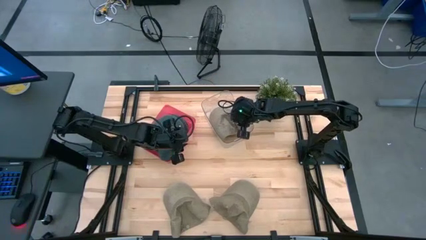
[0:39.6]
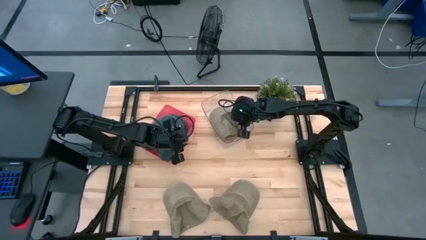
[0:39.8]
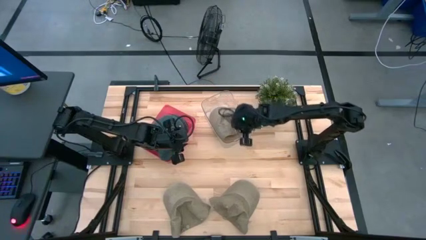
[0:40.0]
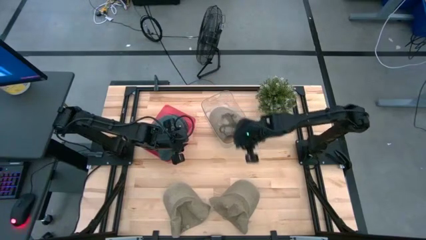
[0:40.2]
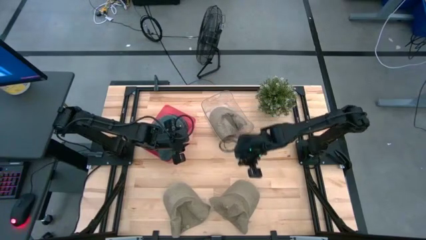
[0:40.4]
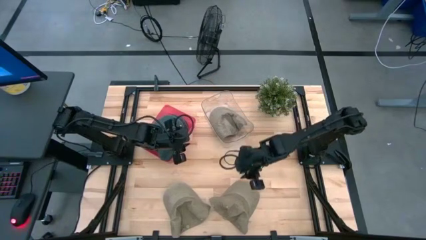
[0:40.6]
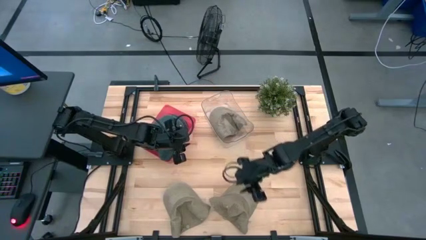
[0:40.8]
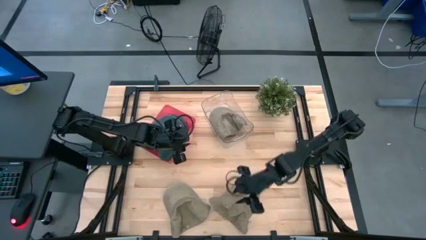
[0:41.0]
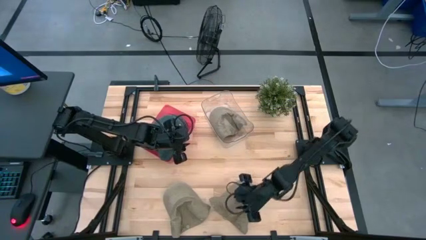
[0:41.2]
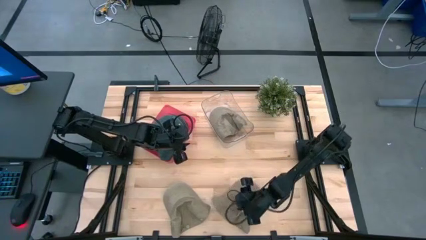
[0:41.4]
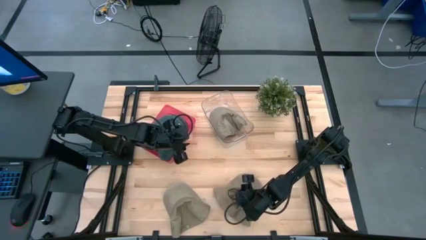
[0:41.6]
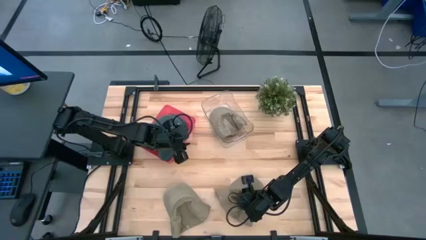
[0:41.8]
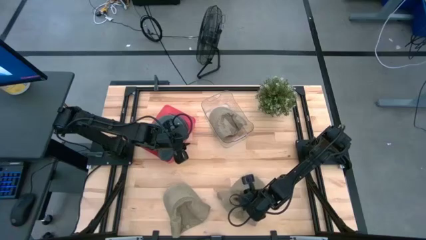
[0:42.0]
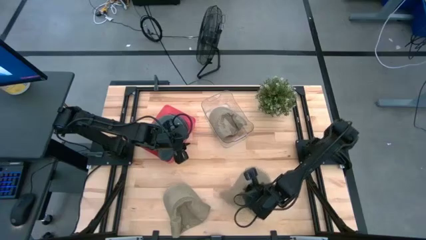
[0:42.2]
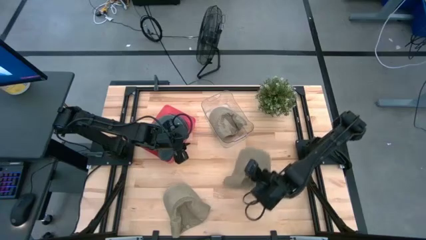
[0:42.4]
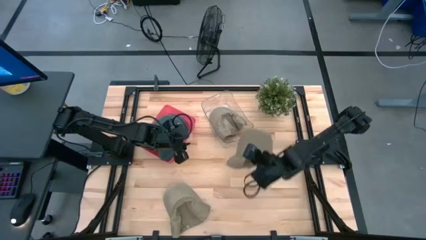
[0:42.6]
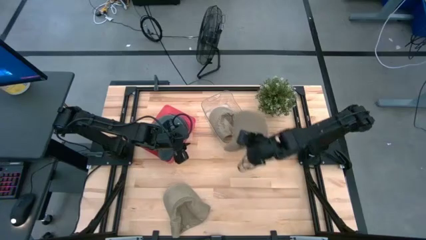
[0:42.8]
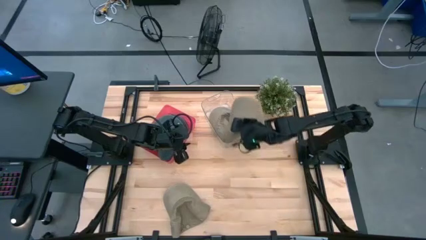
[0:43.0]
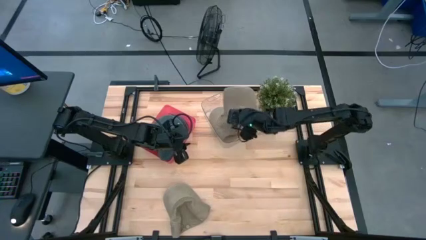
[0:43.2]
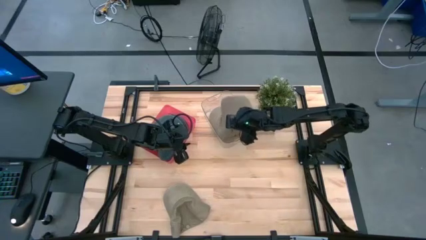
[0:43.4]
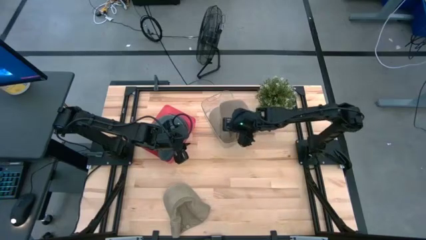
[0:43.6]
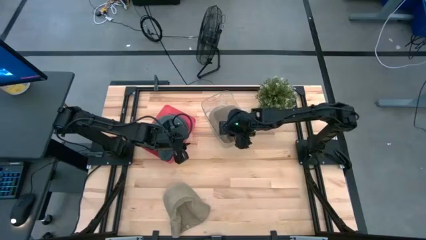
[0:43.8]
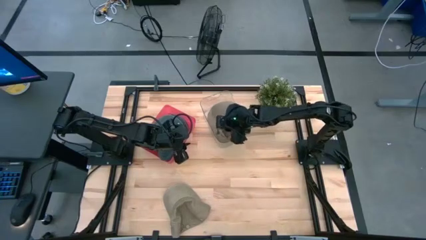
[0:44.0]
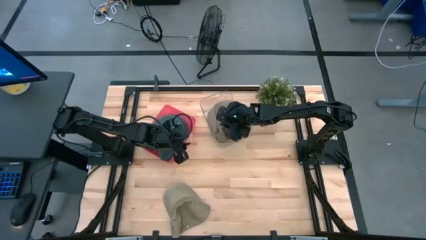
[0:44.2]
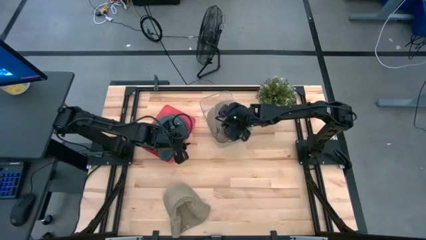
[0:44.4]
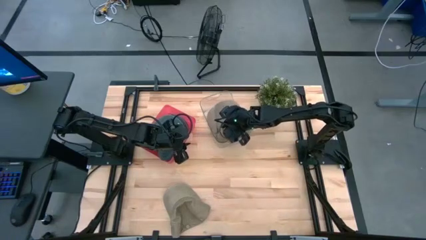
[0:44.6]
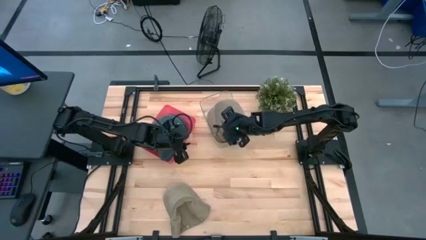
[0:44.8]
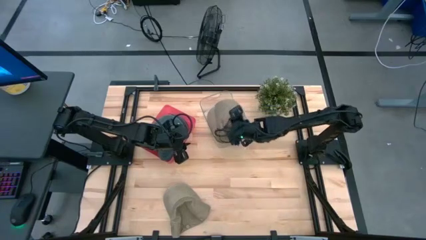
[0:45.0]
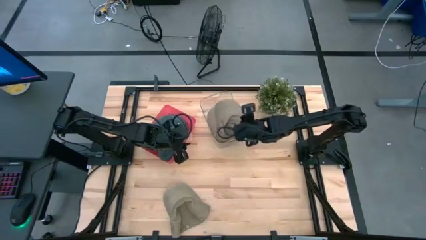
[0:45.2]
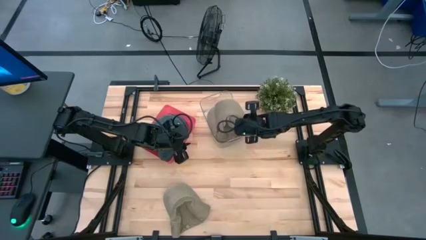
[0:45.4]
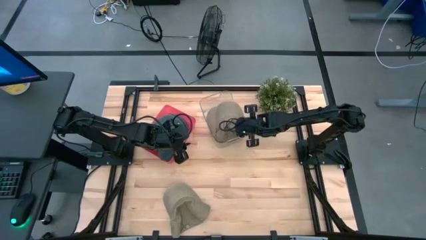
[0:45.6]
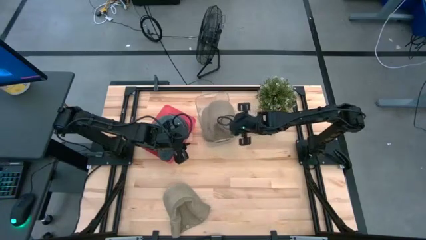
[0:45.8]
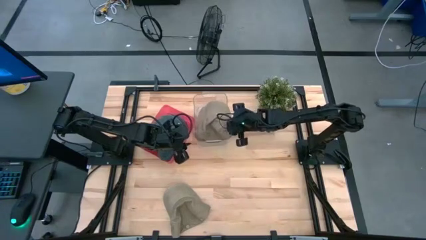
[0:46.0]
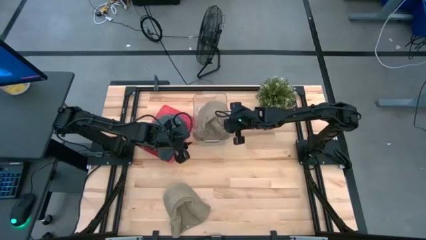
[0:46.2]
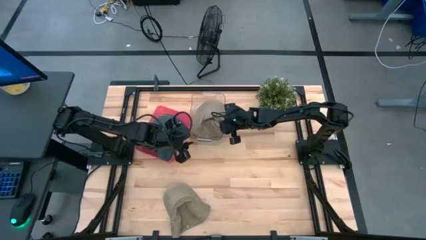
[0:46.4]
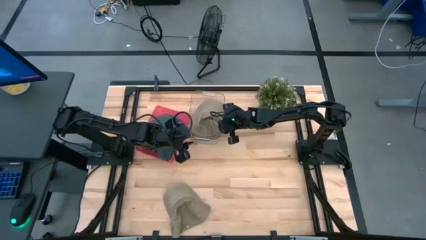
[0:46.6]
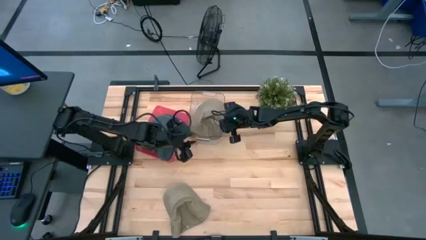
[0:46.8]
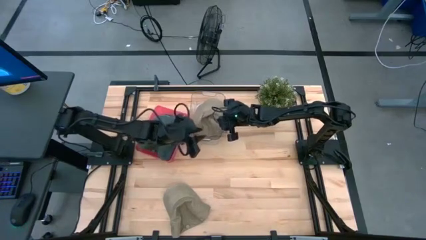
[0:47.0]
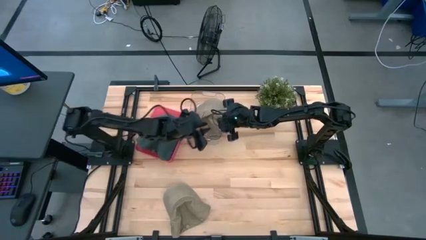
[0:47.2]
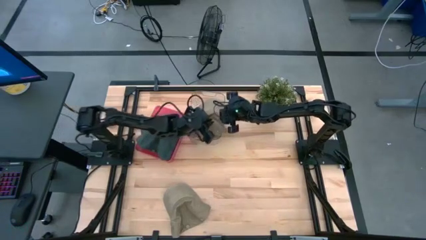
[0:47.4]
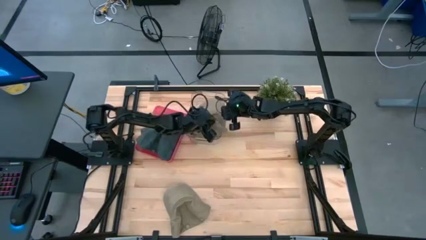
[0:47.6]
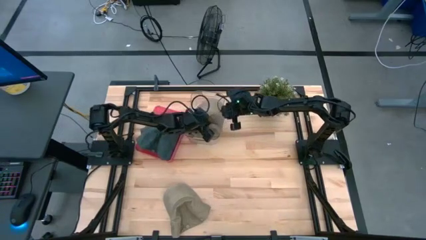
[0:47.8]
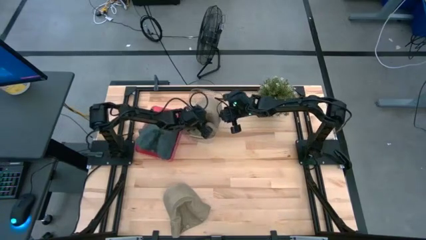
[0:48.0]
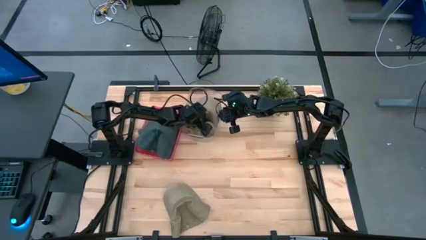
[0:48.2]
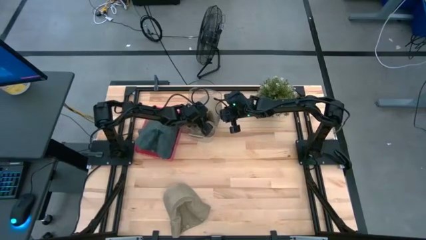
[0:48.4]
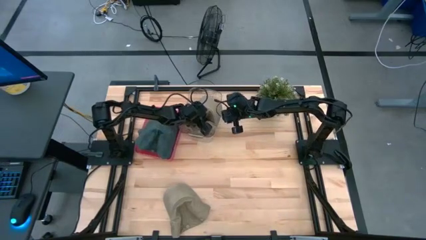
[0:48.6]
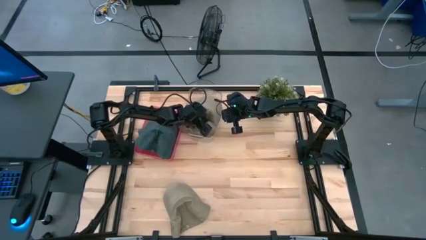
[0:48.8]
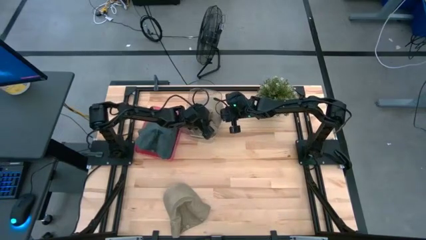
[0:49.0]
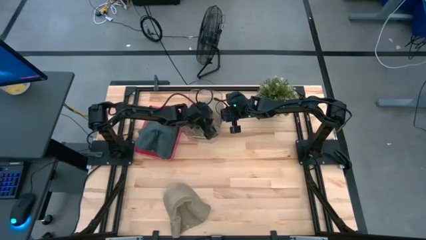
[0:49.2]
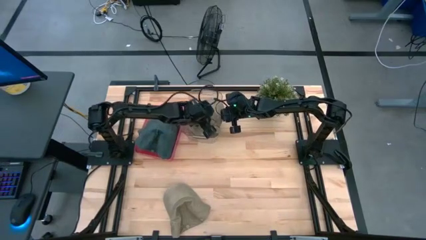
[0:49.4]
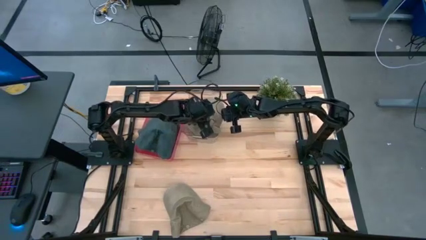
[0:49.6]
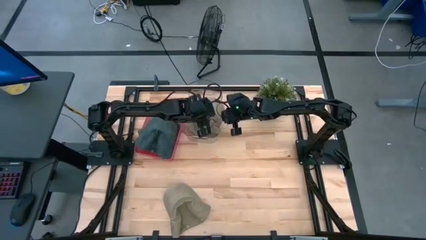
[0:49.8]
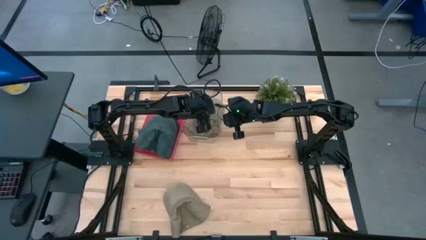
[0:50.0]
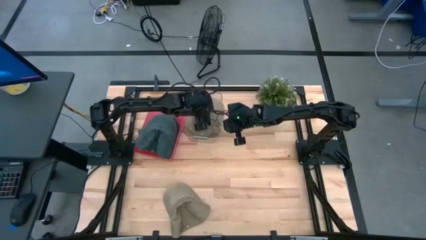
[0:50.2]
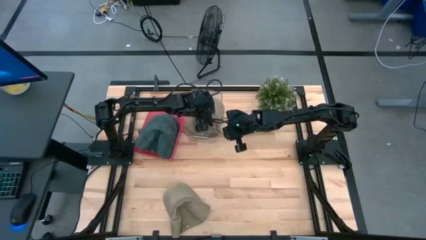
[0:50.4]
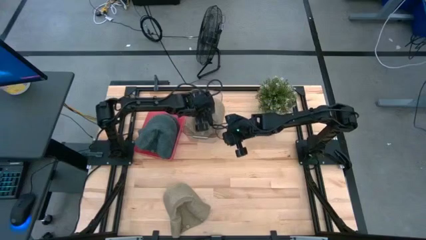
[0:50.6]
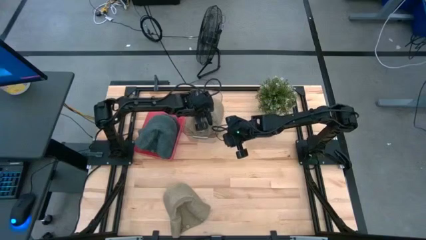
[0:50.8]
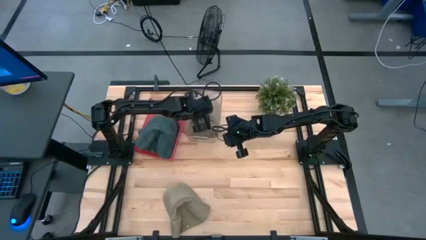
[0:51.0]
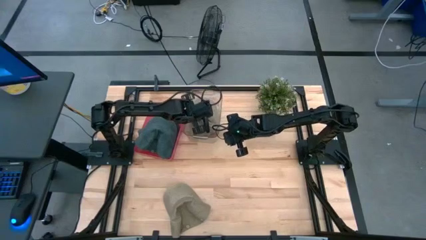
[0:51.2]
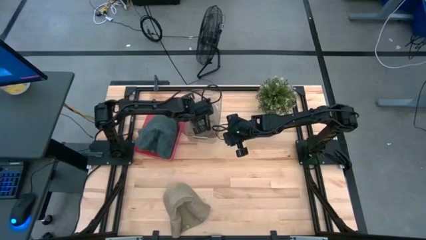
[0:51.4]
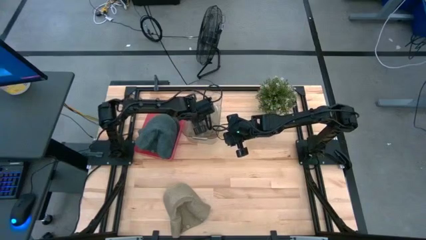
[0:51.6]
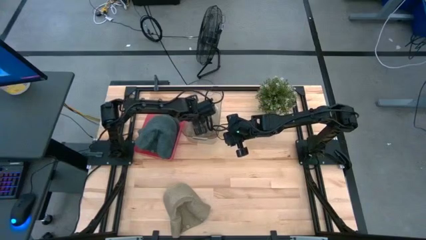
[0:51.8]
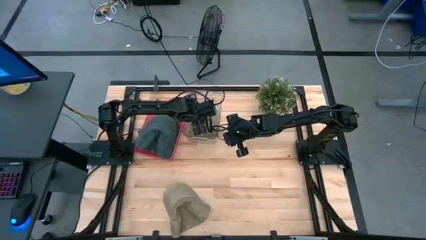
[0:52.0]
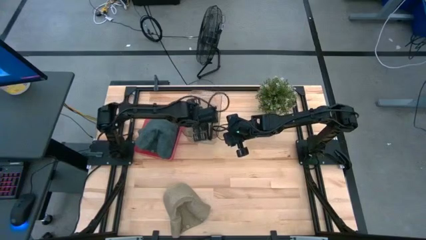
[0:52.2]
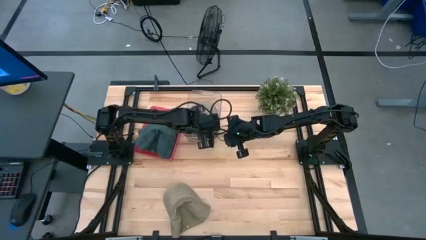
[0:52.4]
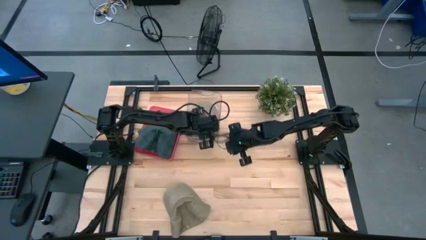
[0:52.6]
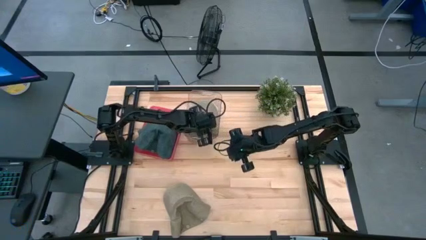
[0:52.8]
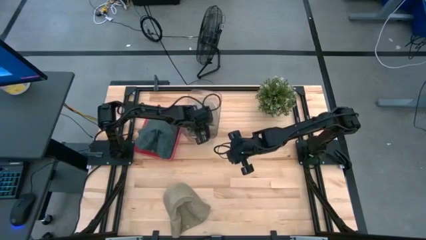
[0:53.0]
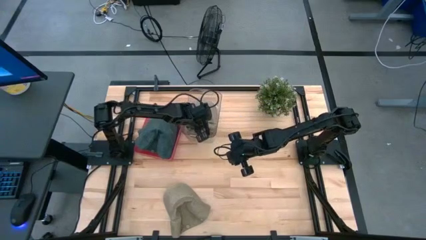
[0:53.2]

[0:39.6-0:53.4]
Task: Pick & Place hat
Put the right brown cap into the transparent bin

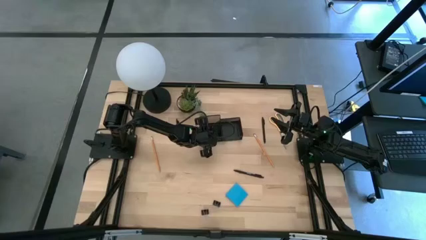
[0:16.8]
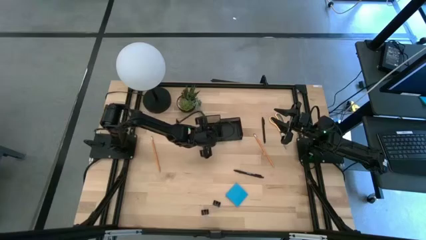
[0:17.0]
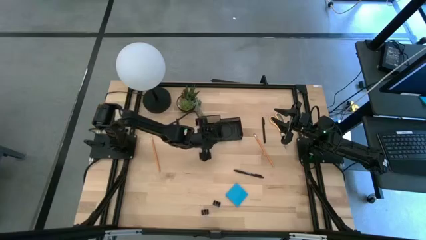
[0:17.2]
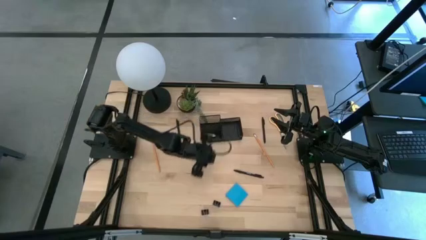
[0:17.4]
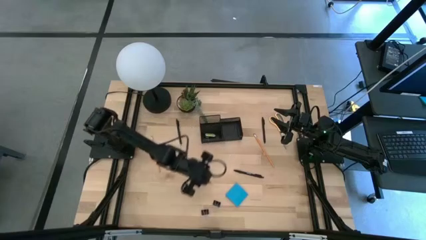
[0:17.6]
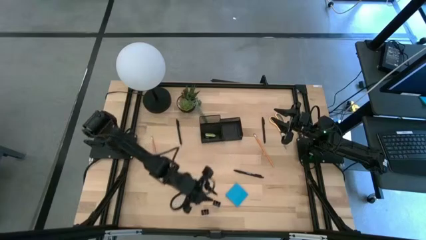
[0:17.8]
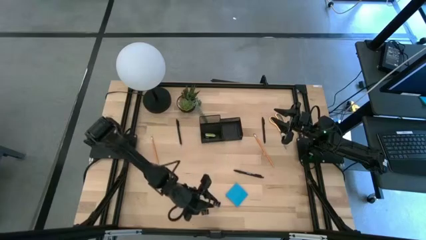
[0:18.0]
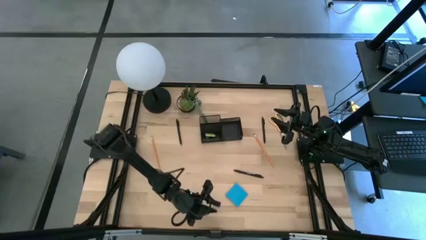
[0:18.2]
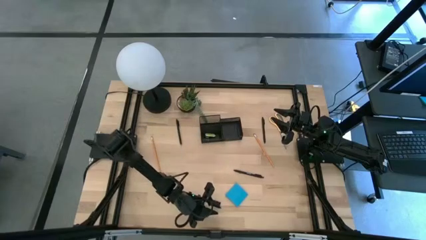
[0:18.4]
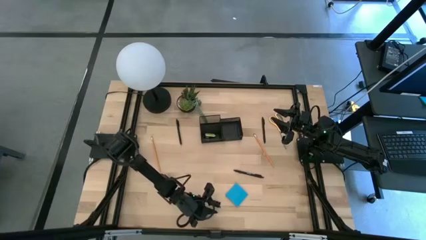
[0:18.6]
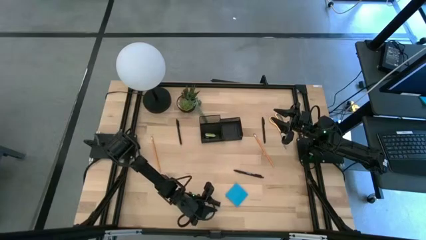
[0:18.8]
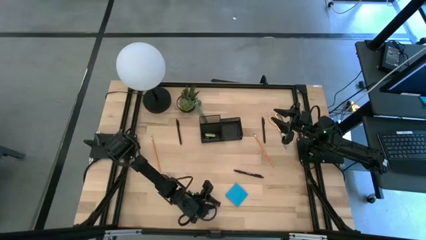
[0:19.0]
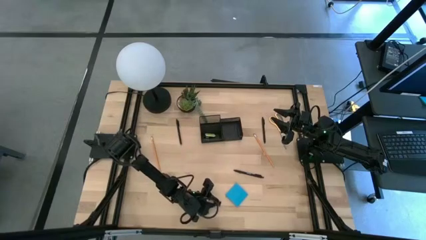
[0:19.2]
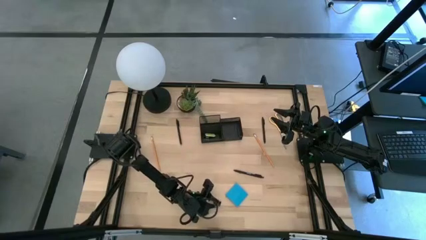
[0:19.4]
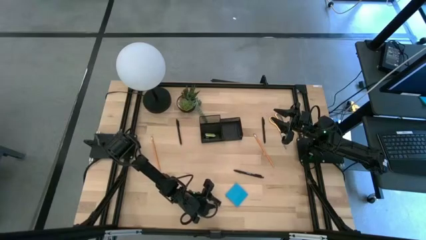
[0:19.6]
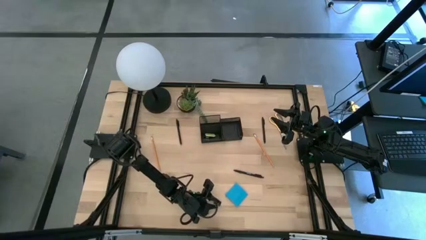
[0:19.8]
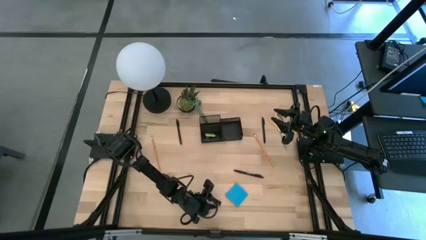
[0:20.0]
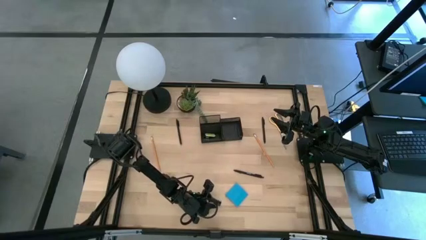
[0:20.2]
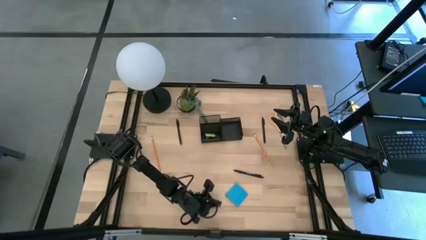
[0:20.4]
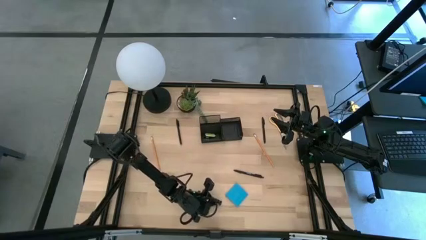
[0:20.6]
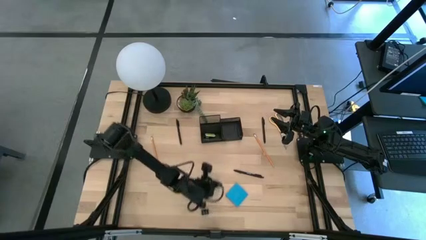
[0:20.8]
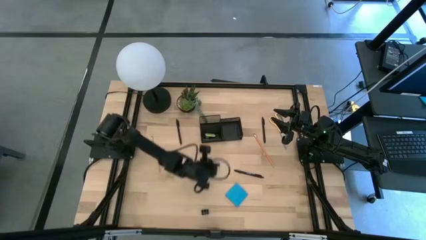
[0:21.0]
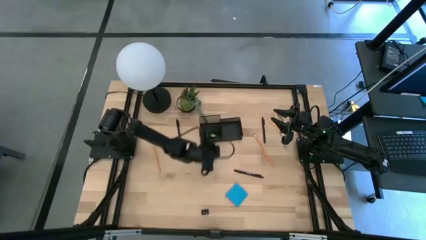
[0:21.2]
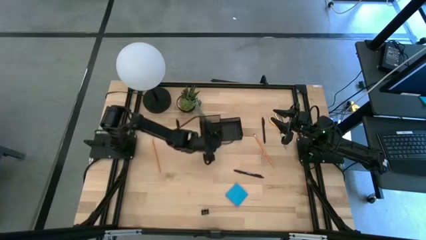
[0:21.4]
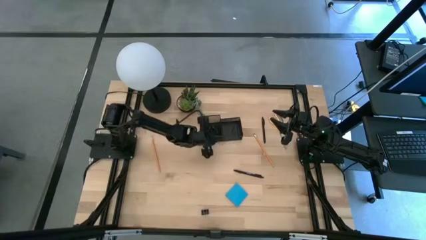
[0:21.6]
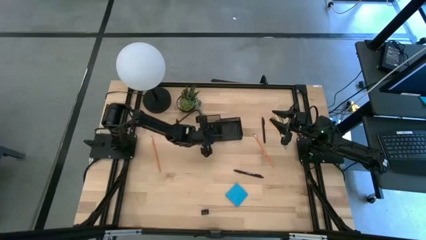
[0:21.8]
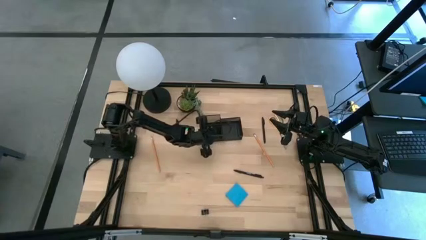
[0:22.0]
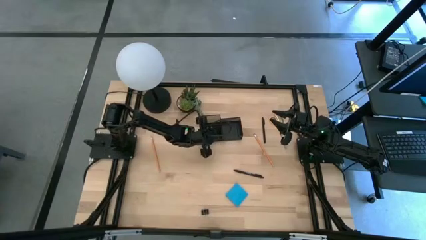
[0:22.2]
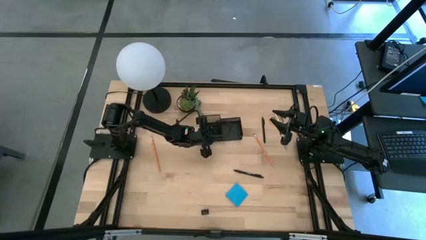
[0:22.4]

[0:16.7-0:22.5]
Task: Pick and place office supplies into organizer
Put the right black binder clip into the desk organizer
